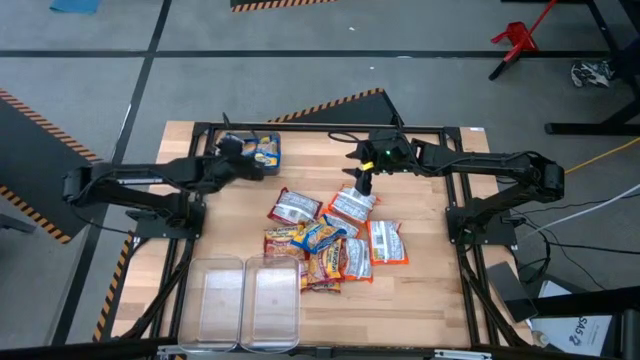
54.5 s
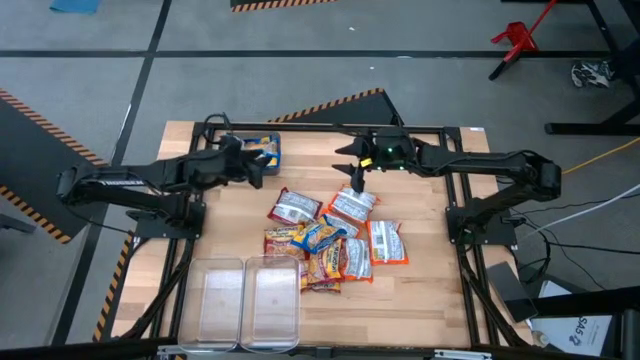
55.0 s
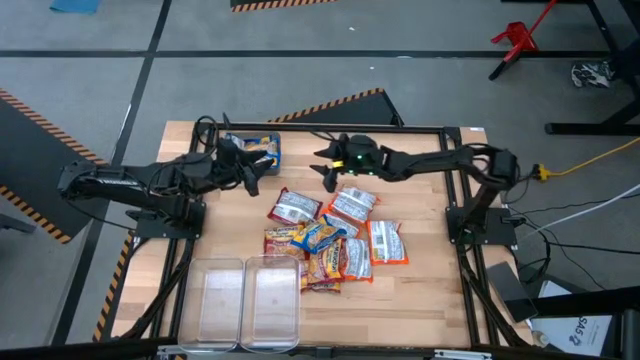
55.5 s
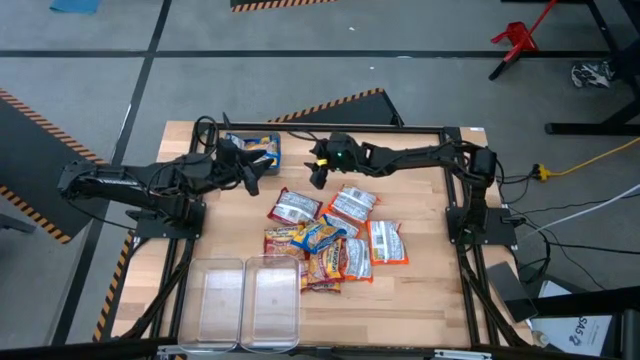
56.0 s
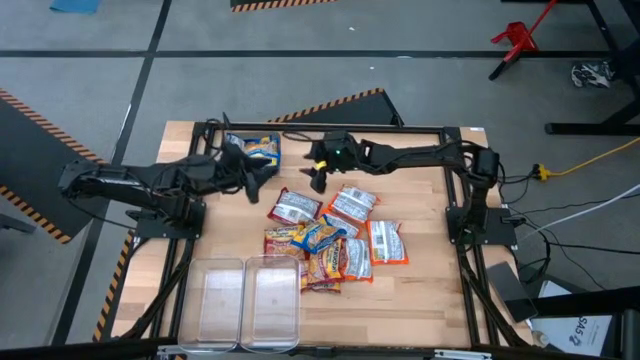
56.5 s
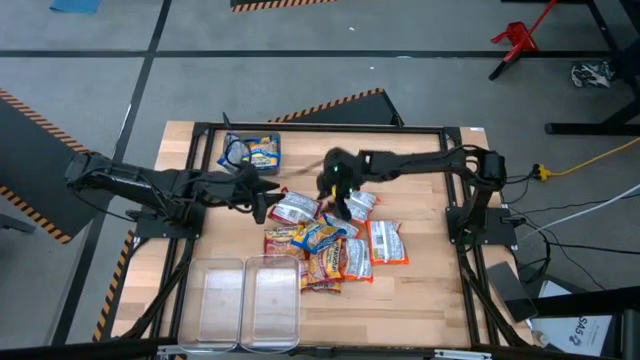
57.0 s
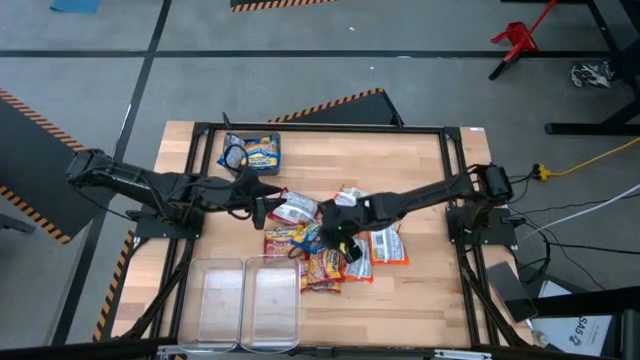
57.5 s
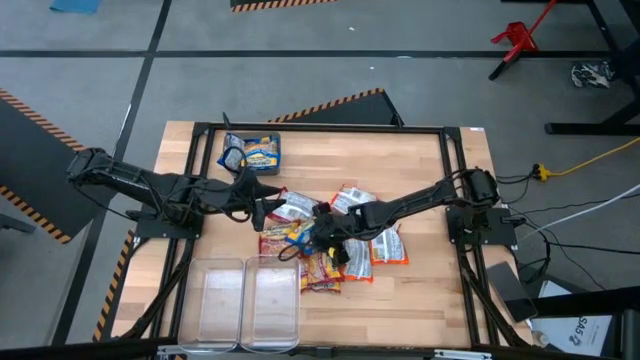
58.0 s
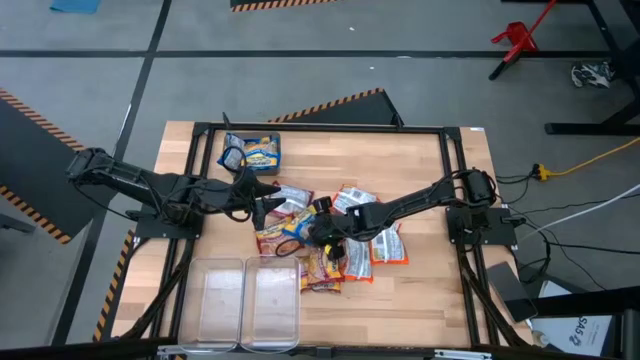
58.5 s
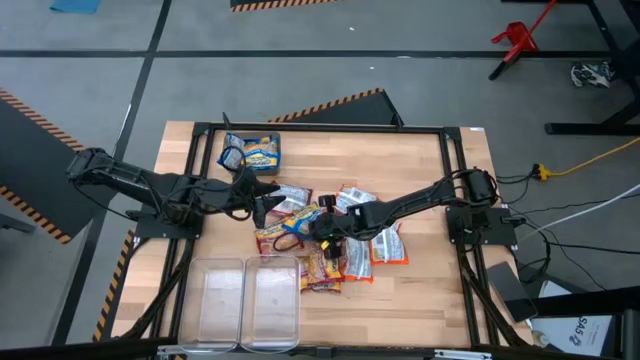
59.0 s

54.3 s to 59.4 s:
Task: Sort Maruchan noodles
Put the blue noodle pack into the black bin

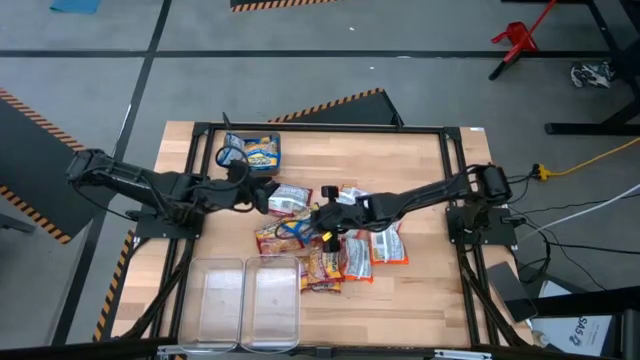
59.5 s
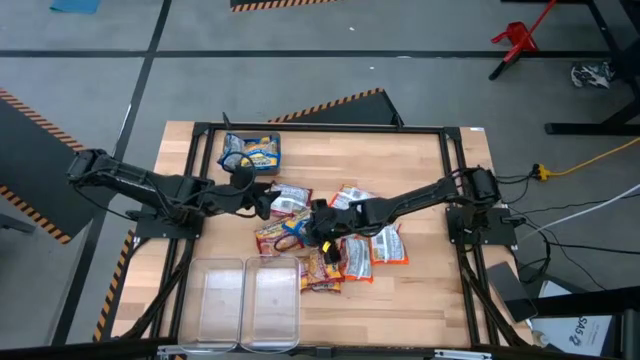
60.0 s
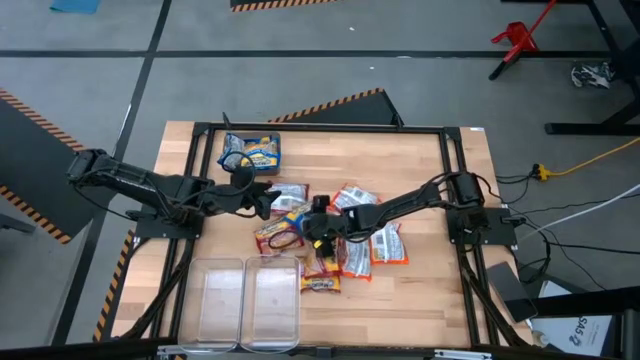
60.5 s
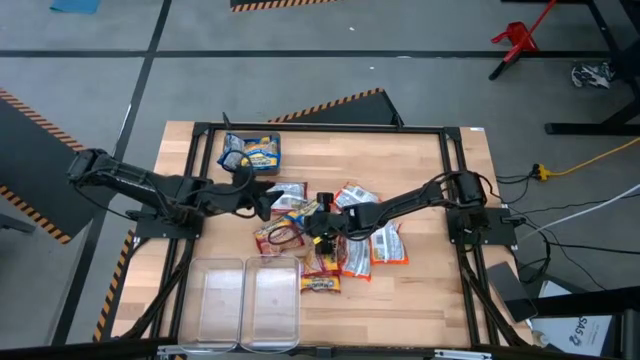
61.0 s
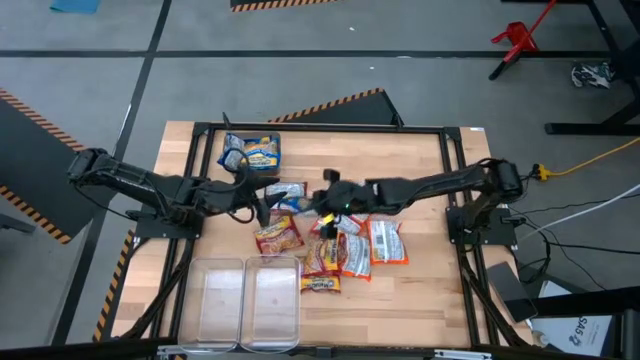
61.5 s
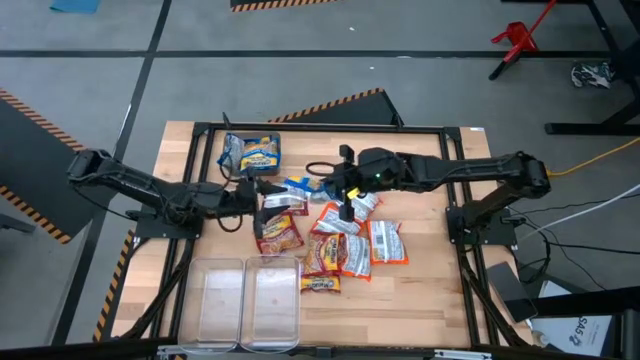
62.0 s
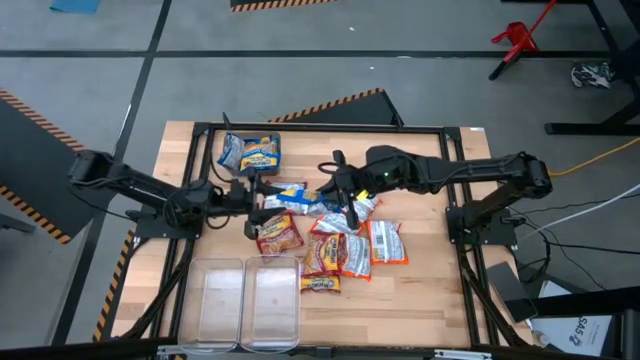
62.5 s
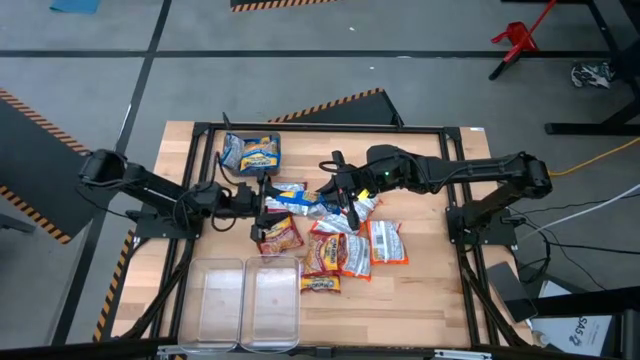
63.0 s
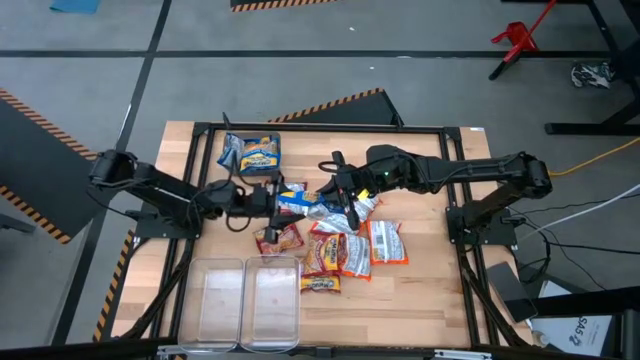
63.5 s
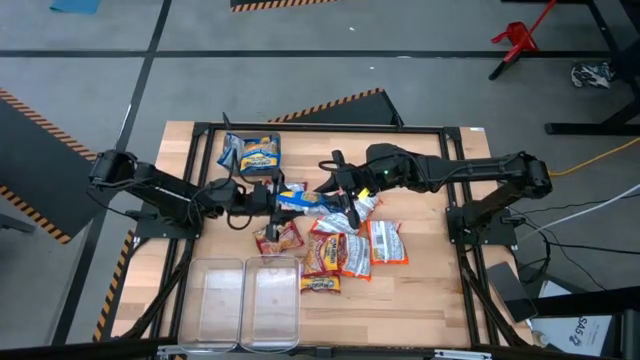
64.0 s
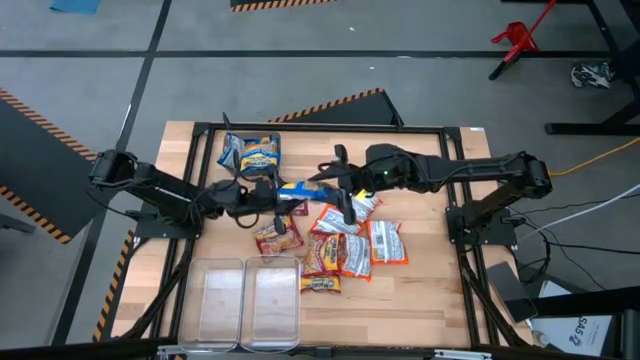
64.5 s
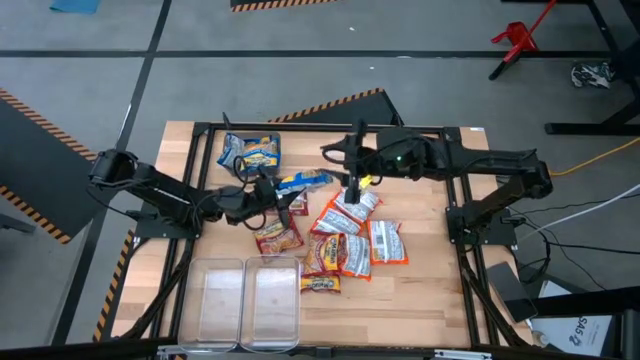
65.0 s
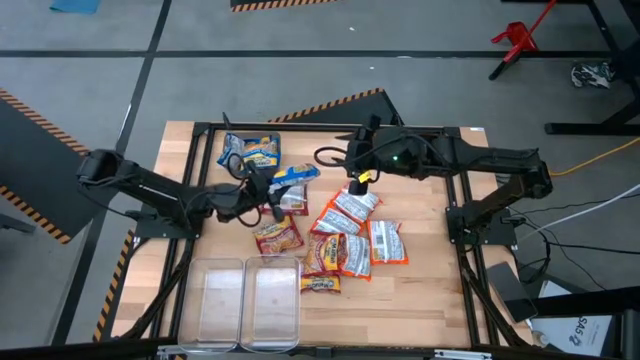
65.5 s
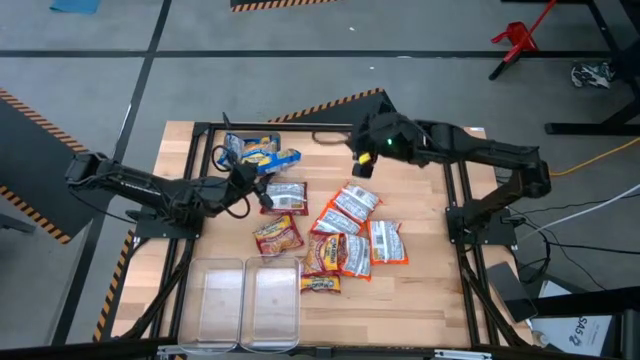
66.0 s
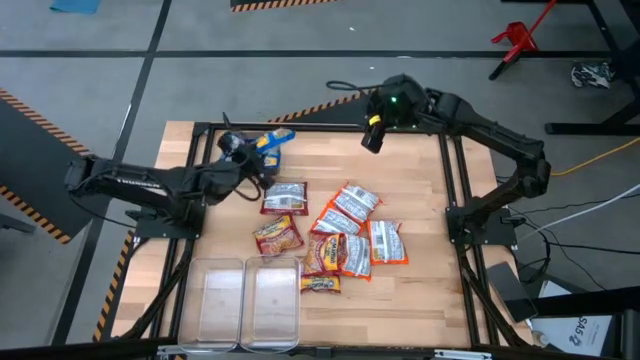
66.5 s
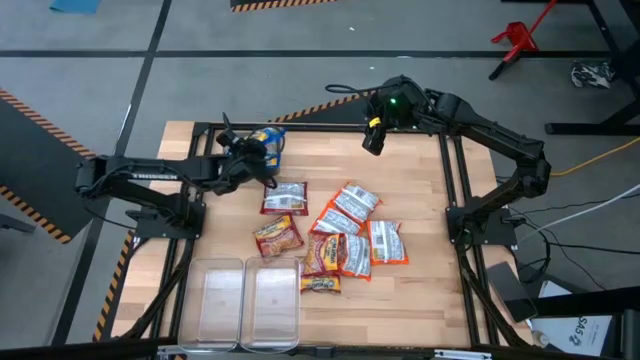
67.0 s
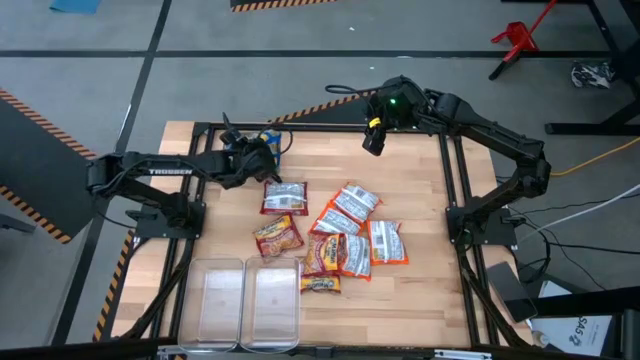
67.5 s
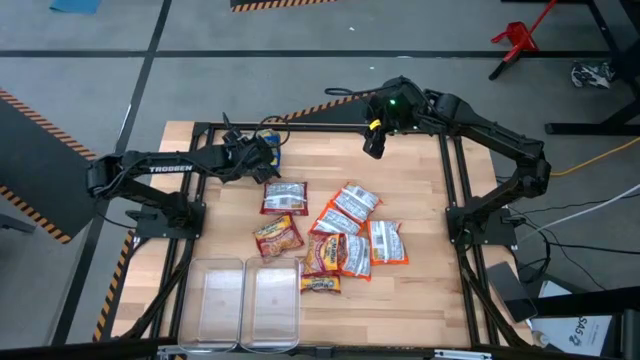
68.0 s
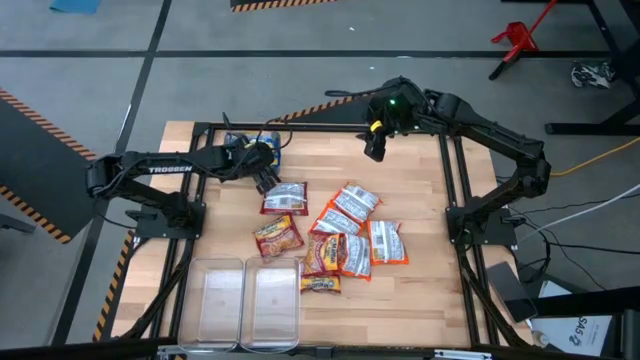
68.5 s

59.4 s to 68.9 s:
Put the blue noodle pack into the black bin

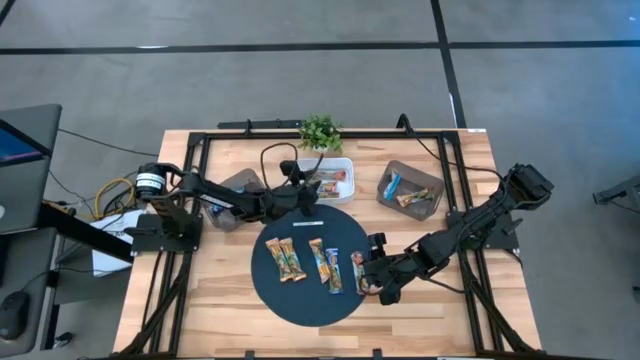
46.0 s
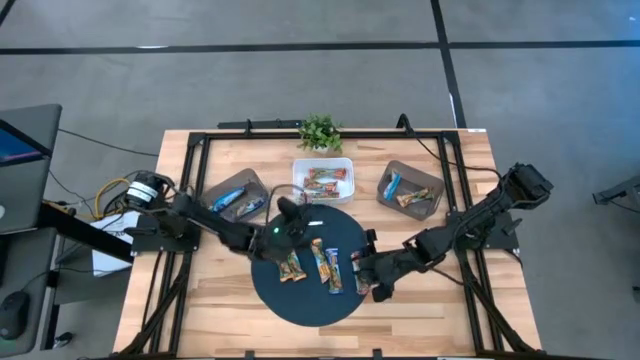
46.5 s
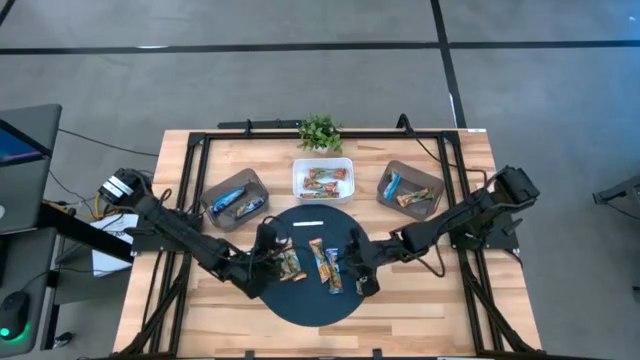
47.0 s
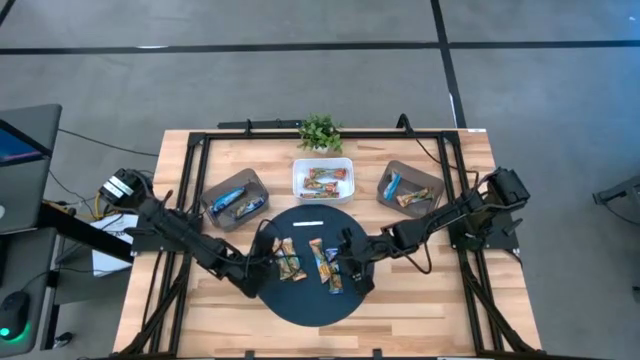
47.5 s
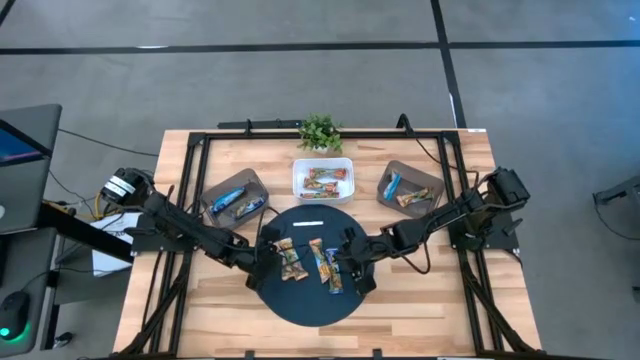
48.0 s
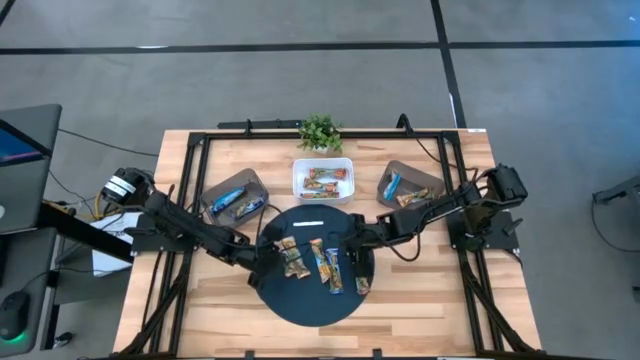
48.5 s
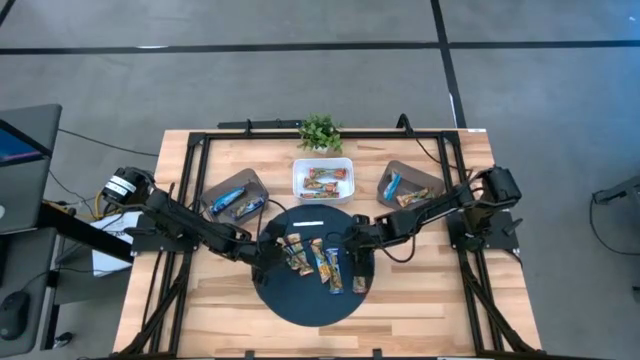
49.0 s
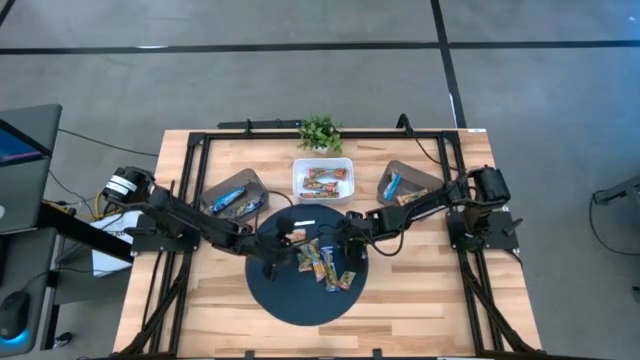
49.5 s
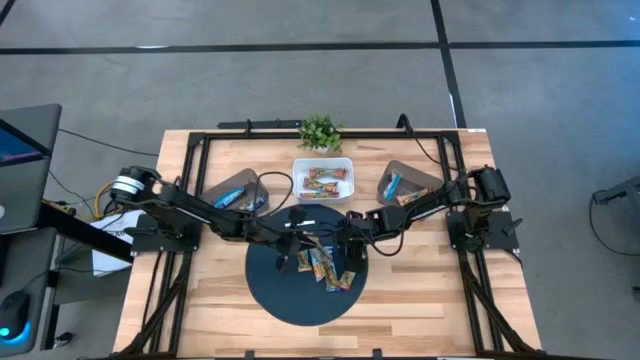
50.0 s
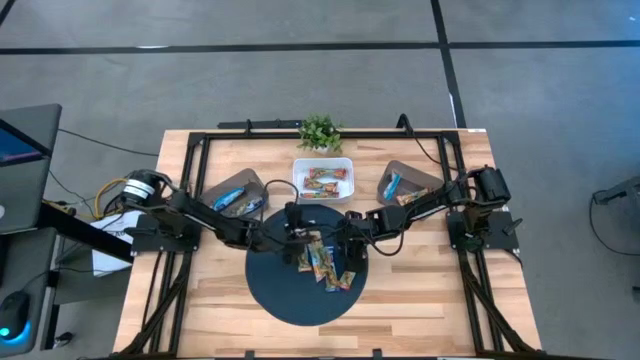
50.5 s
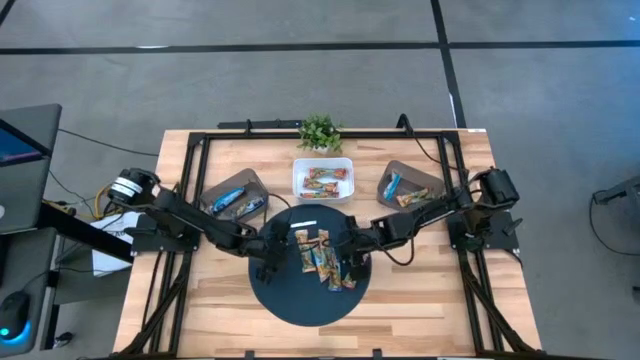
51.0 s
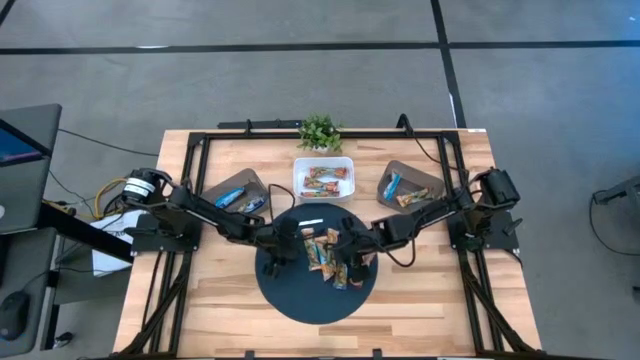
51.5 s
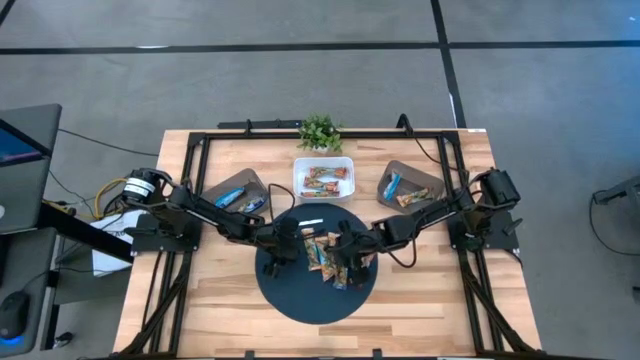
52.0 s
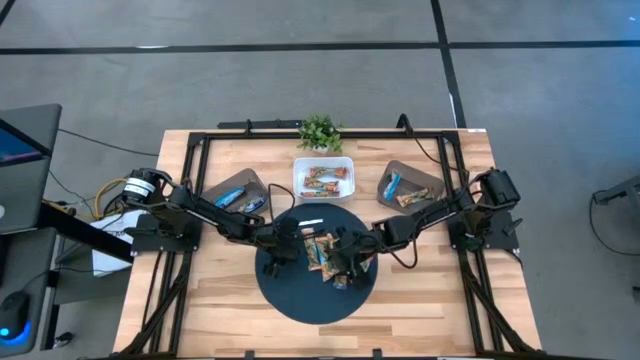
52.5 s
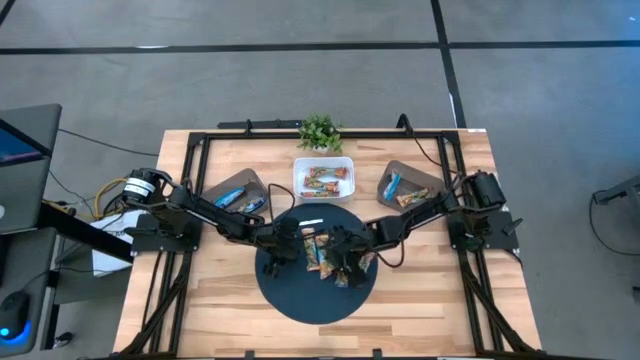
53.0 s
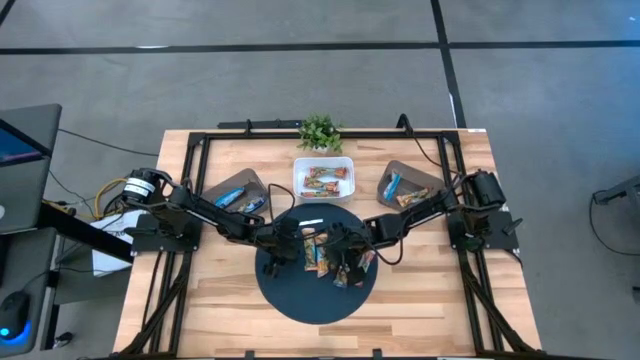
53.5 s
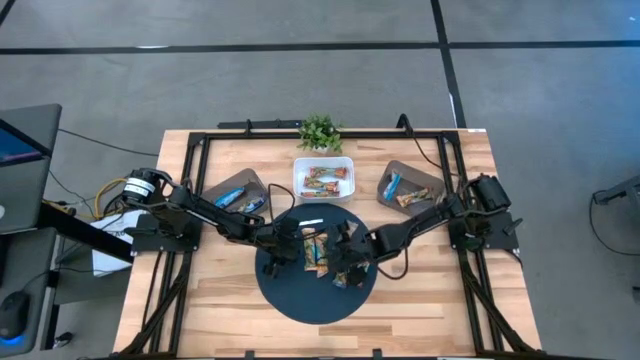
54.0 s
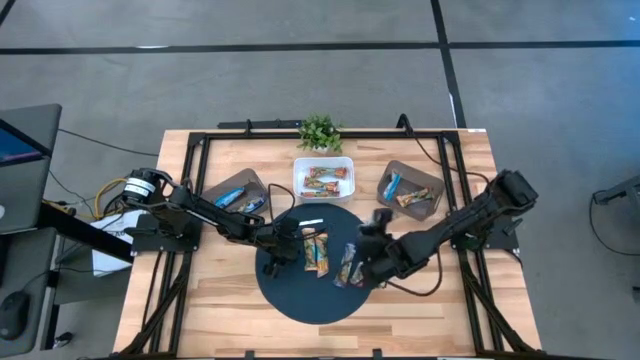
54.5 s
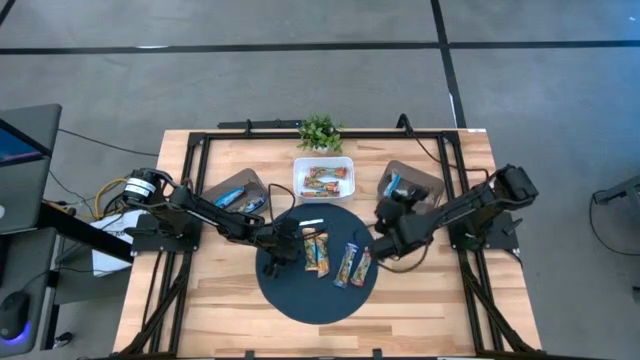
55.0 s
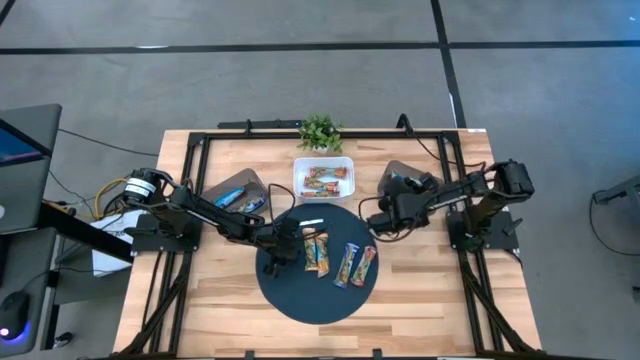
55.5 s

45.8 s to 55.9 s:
Task: Pick and place Granola Bars by type
Put the yellow granola bar into the right black bin
